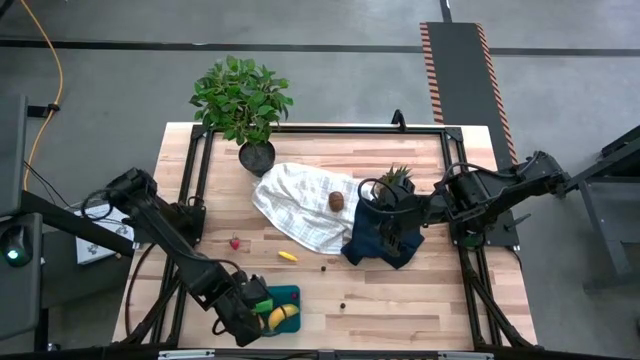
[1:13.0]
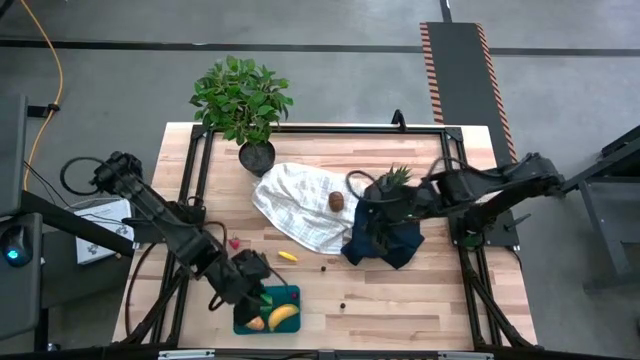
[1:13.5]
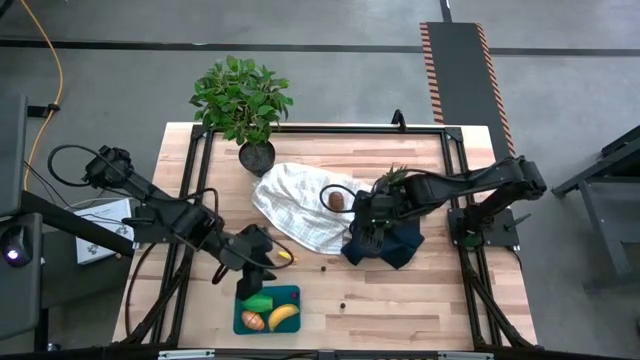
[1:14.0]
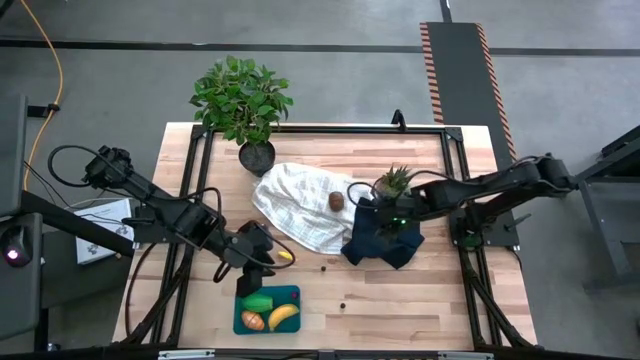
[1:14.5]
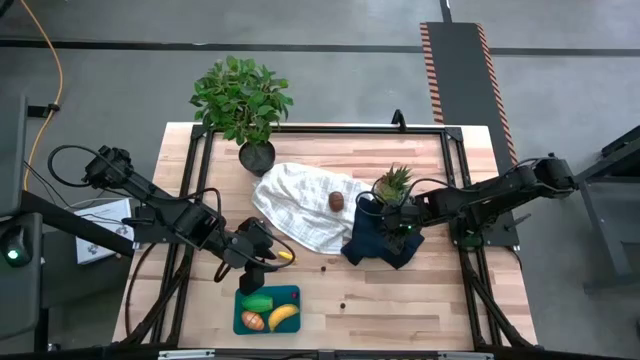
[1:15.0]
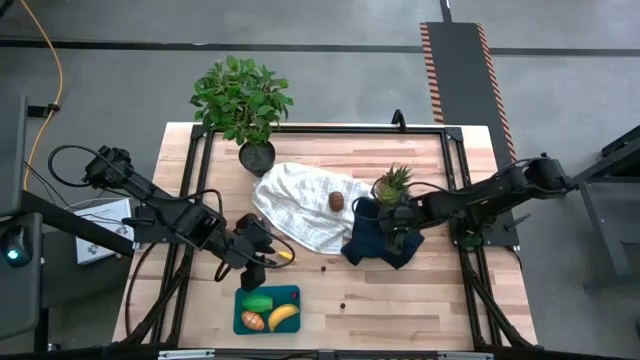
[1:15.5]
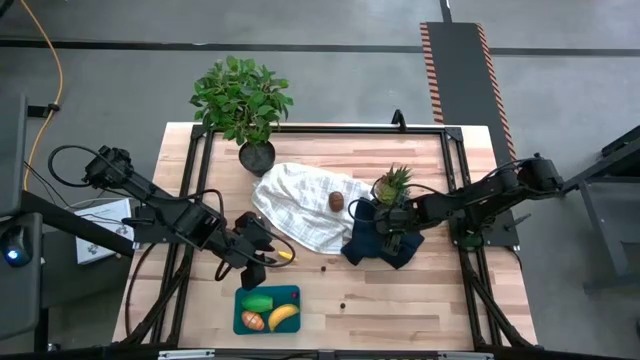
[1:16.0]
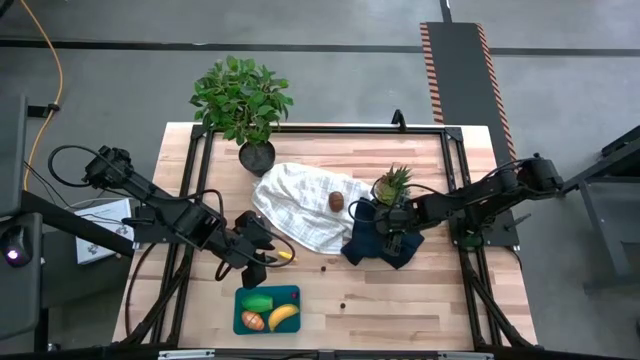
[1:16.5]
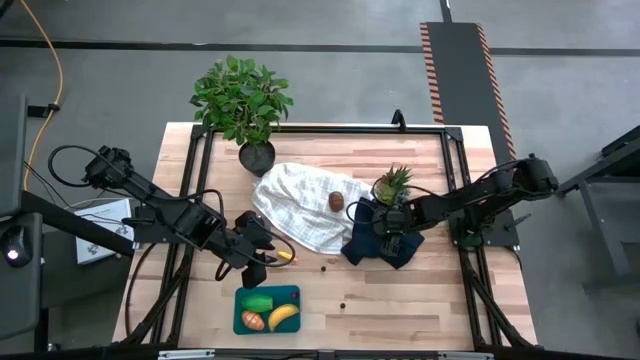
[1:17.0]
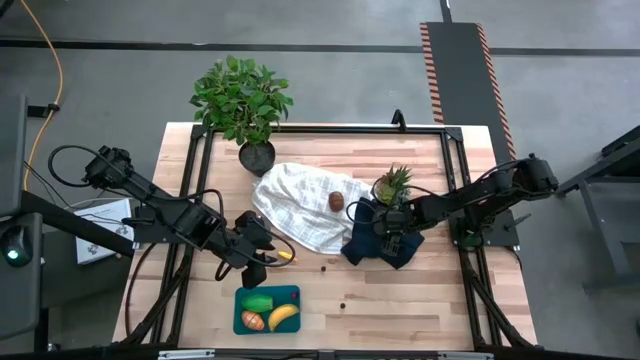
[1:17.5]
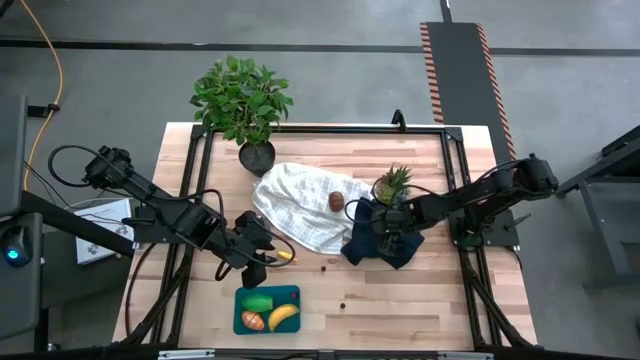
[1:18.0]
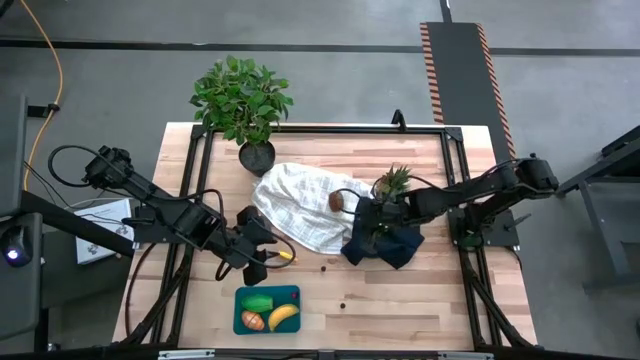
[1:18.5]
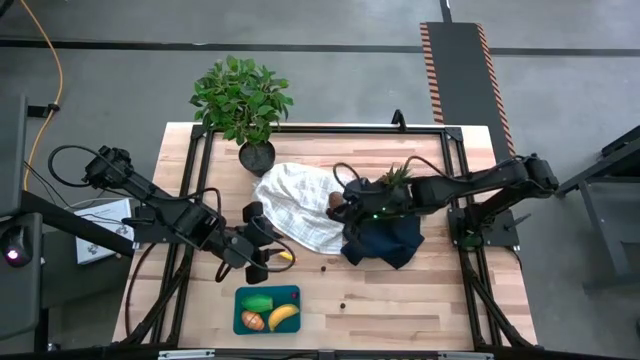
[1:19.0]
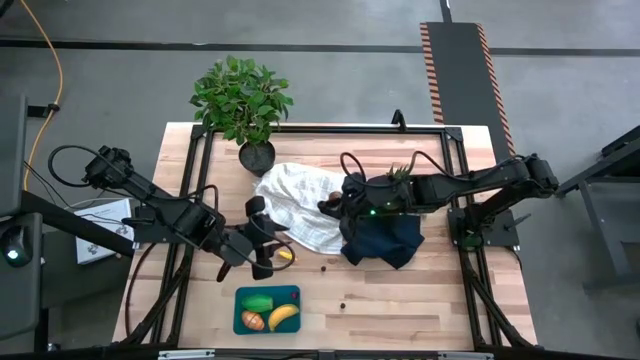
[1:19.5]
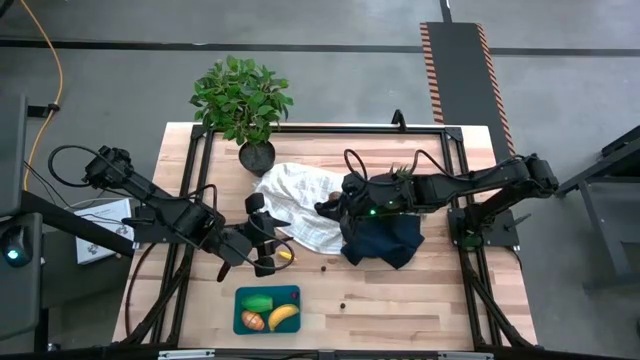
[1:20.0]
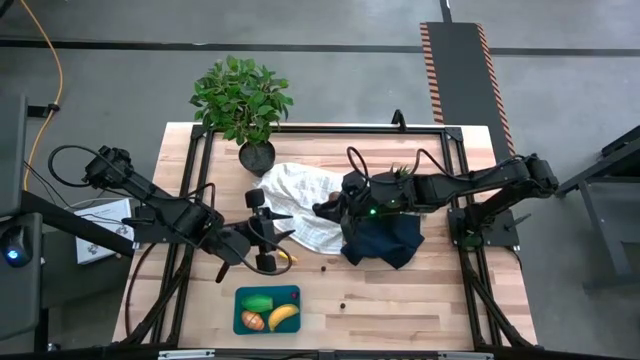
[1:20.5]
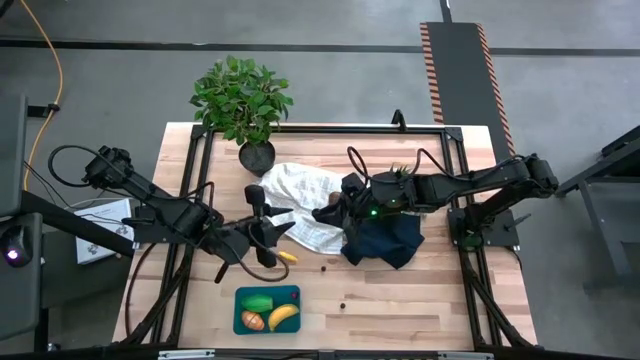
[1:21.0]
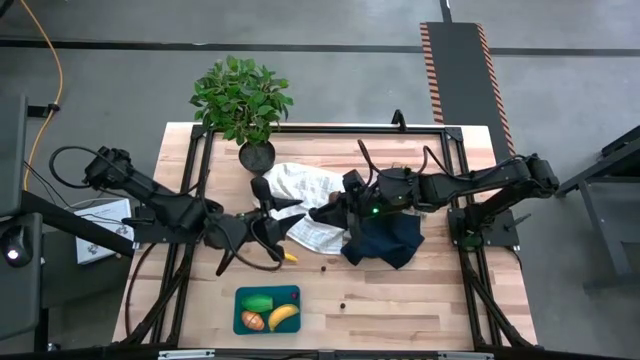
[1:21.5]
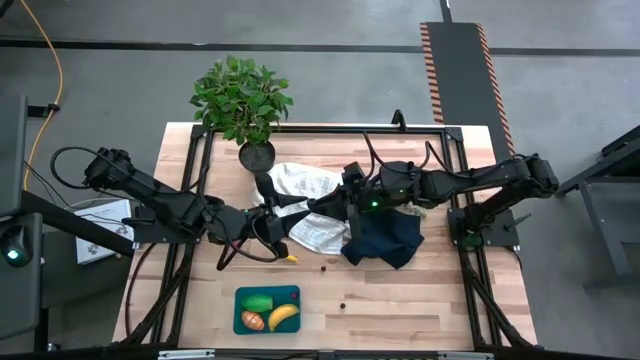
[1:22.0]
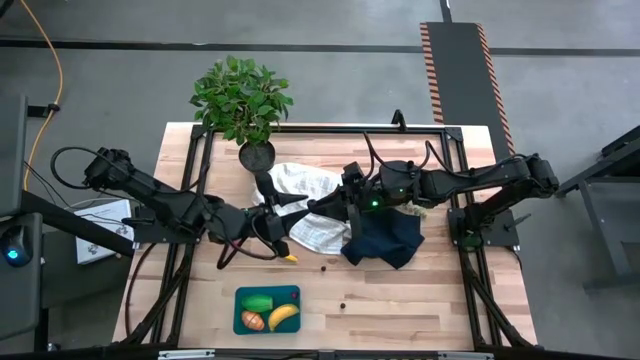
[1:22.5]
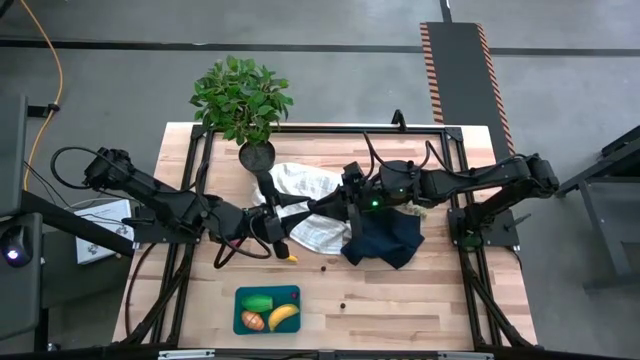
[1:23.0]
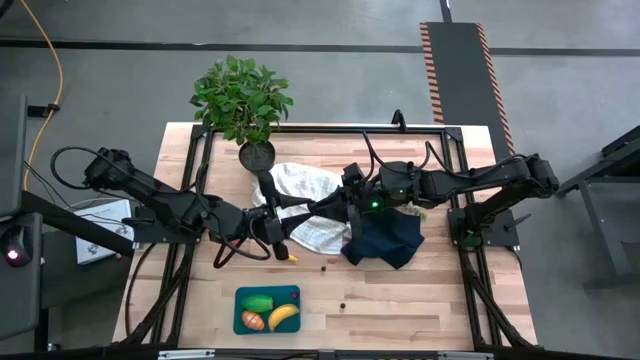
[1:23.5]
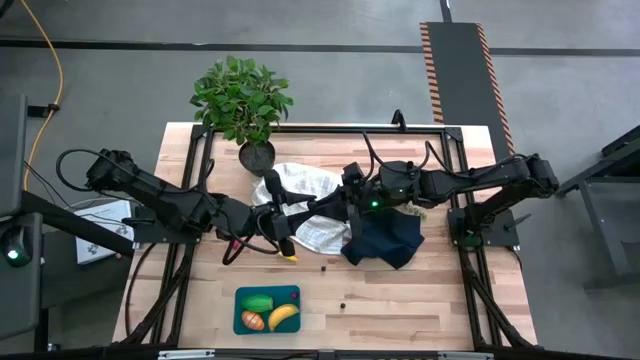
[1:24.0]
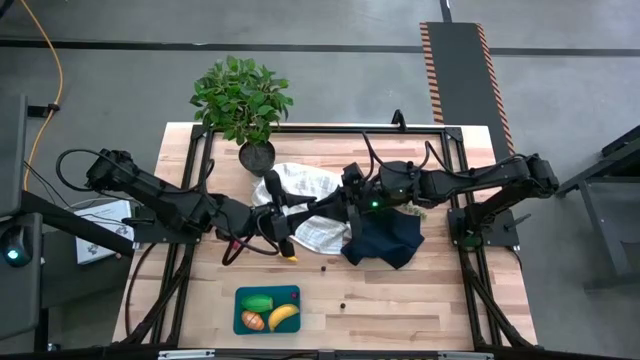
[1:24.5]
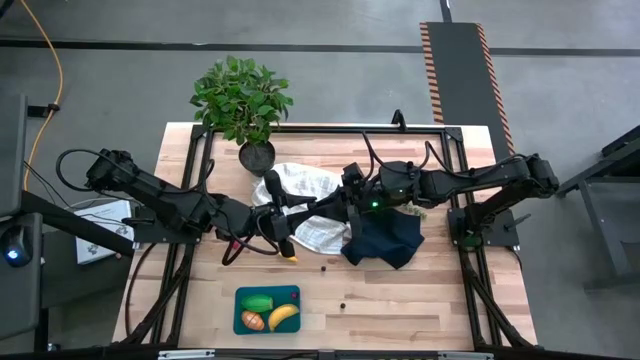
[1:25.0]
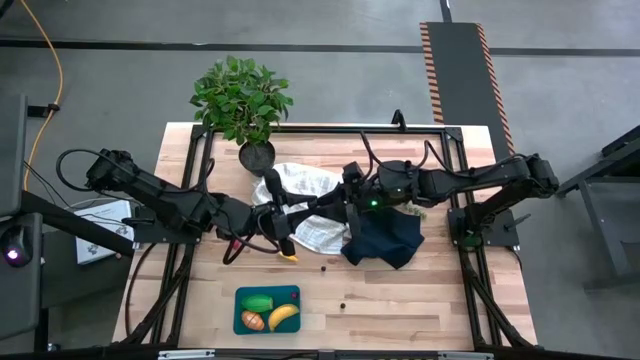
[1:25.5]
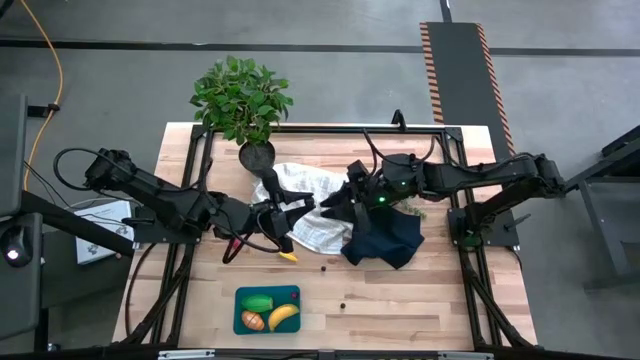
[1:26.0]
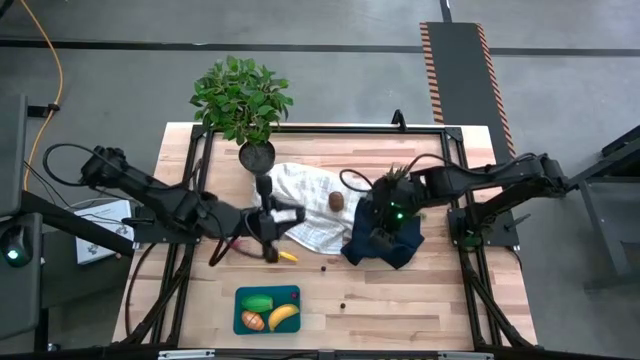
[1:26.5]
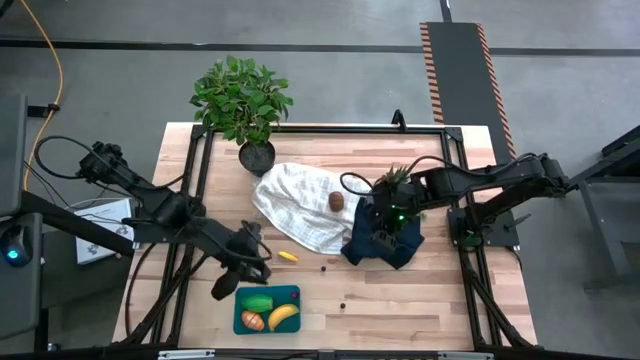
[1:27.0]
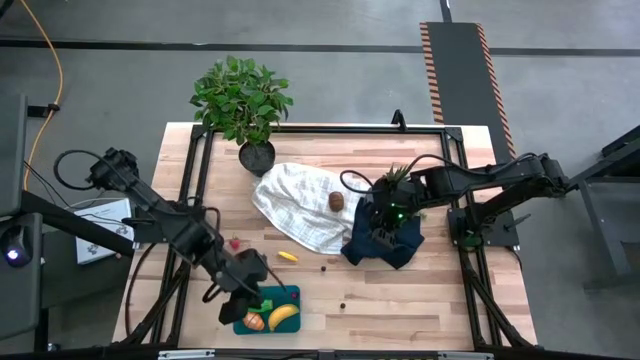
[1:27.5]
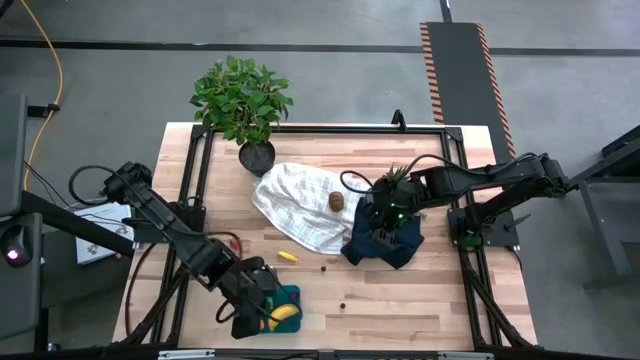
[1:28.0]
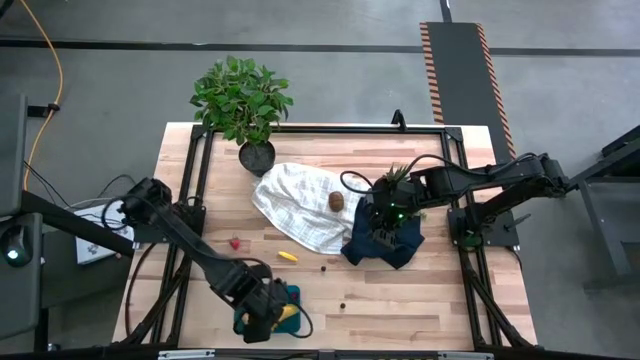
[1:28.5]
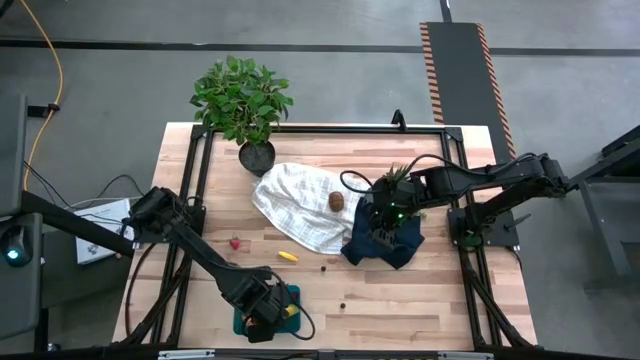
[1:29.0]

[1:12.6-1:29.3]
Task: Pick and placing Produce into tupperware
Put the blackberry into the bin

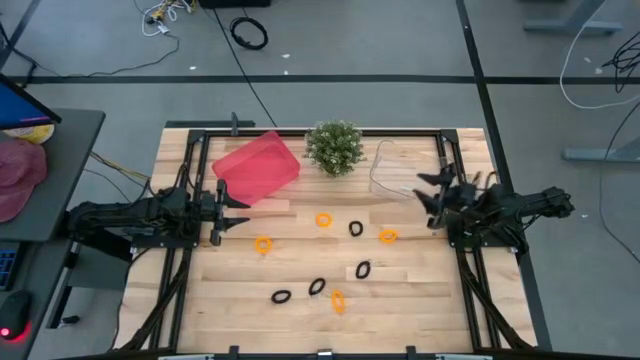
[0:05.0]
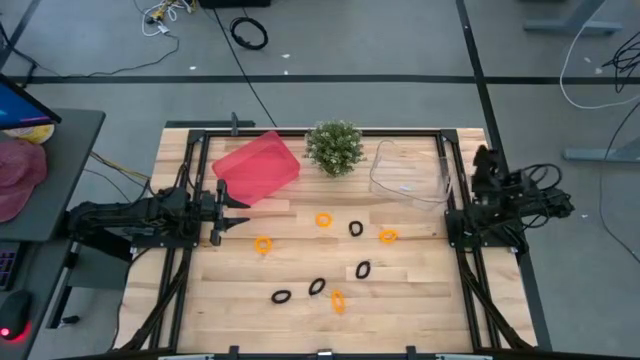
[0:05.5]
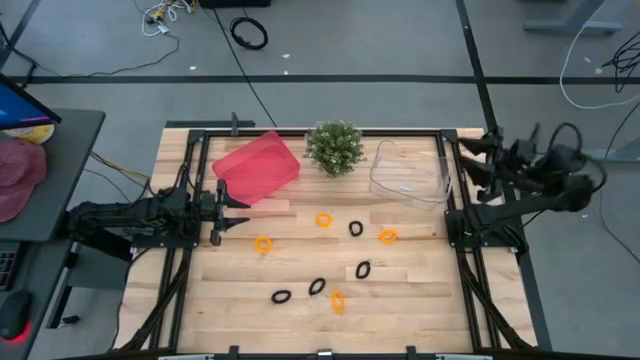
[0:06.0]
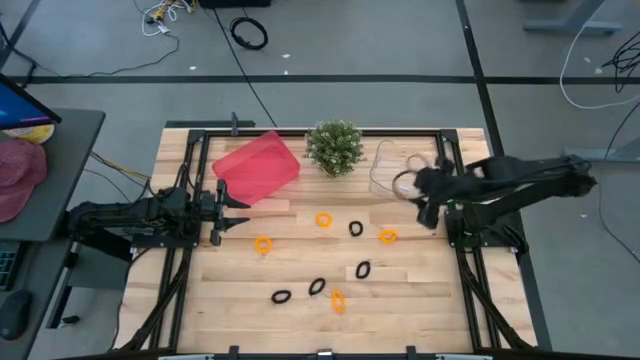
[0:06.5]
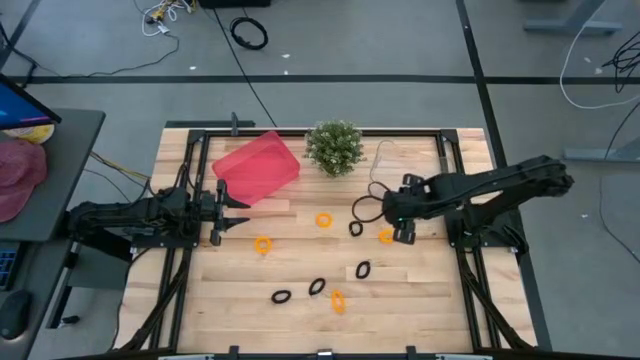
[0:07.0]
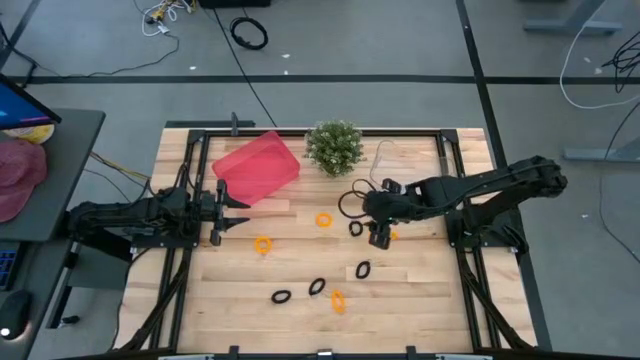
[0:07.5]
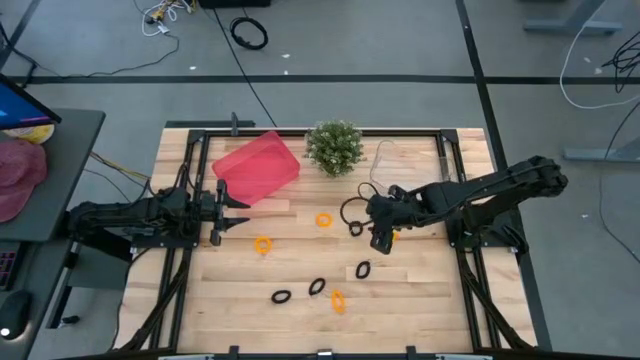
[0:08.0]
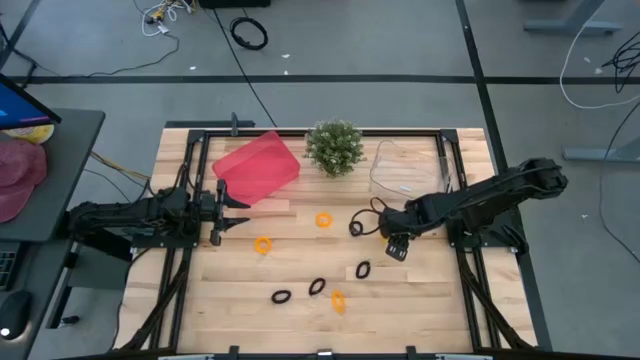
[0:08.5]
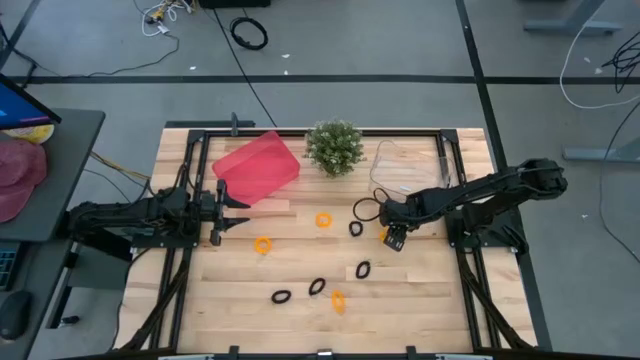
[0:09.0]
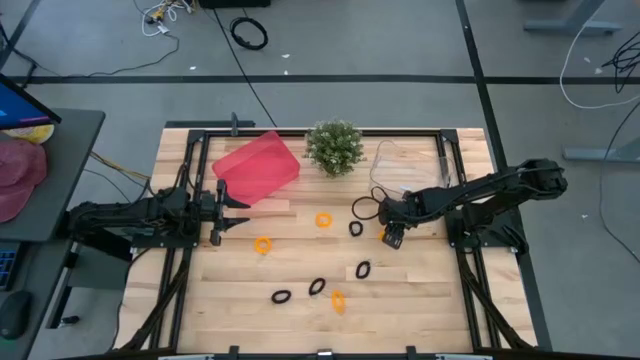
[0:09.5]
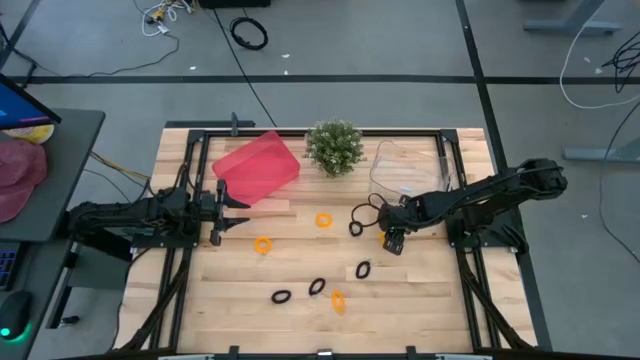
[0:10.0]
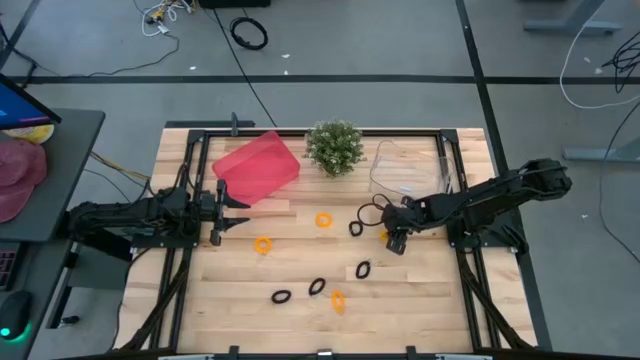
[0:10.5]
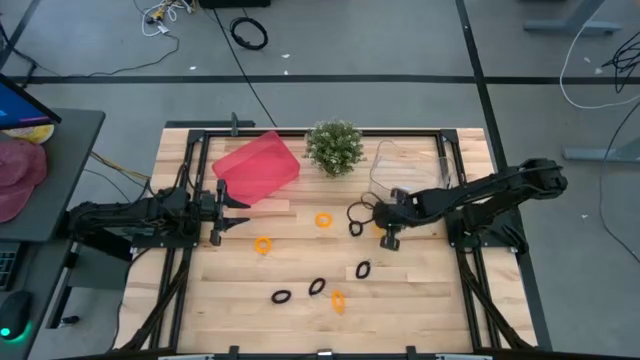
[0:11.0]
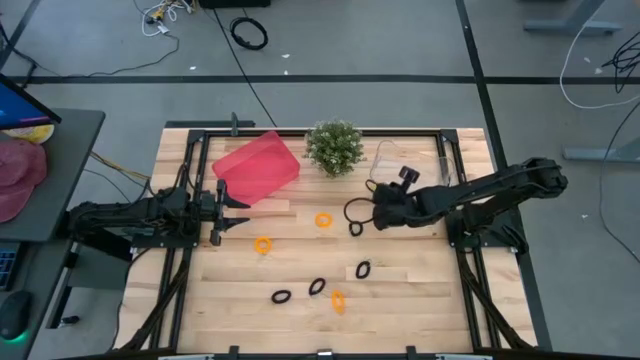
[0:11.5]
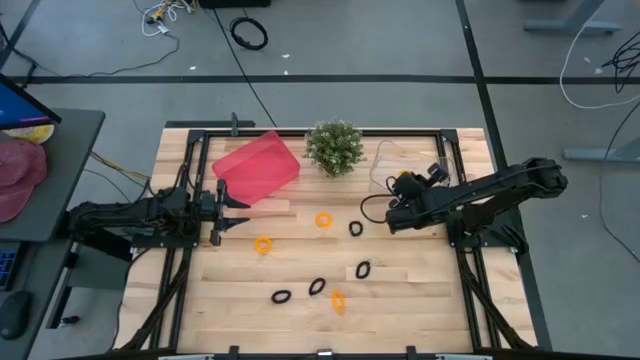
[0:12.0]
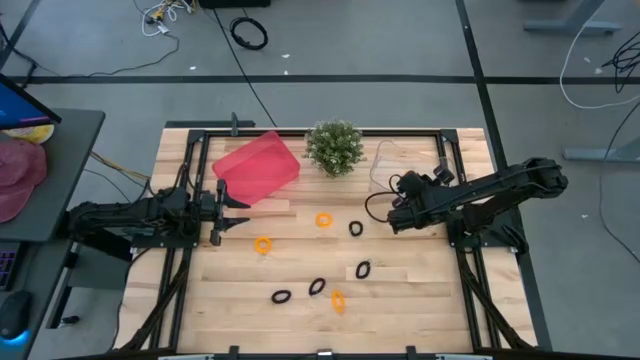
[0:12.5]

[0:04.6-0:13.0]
Task: Sort spring keychains
Put the top right orange spring keychain into the transparent bin
